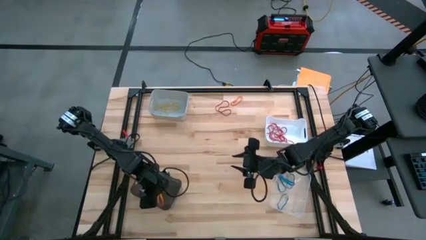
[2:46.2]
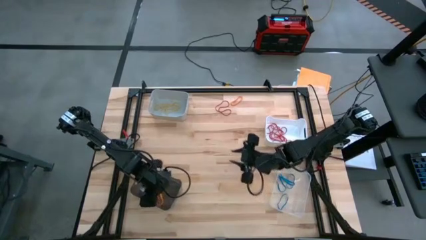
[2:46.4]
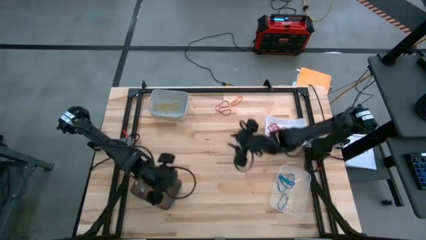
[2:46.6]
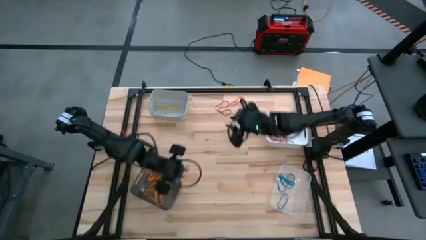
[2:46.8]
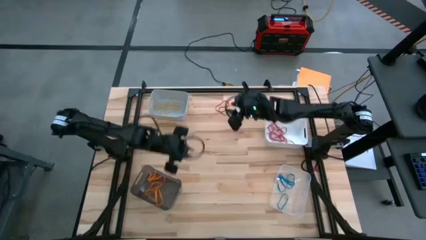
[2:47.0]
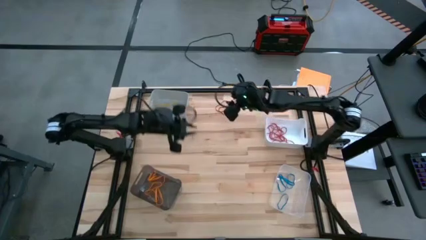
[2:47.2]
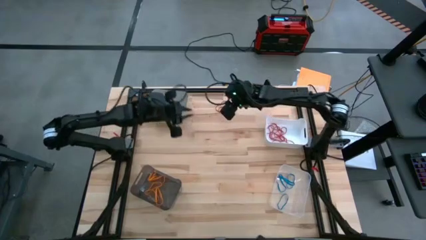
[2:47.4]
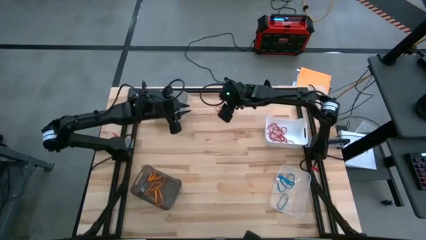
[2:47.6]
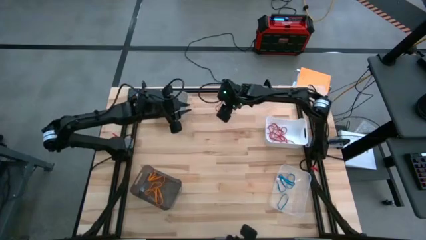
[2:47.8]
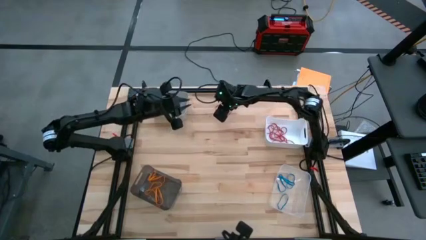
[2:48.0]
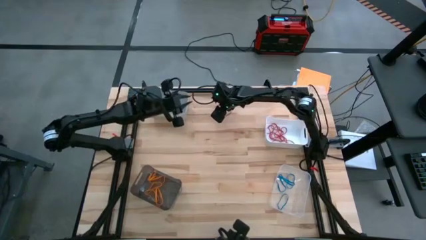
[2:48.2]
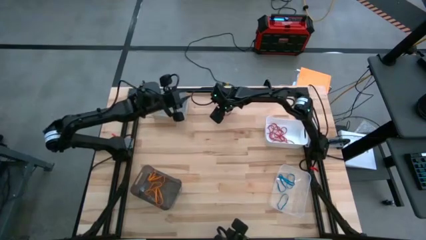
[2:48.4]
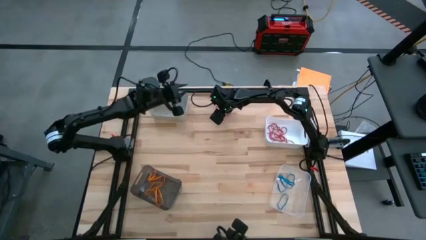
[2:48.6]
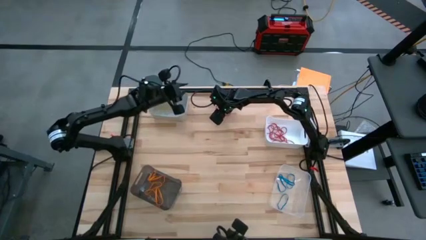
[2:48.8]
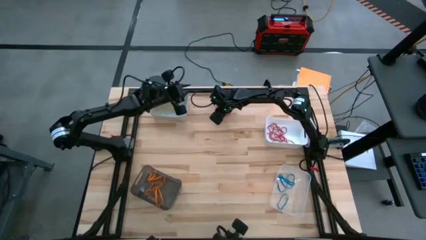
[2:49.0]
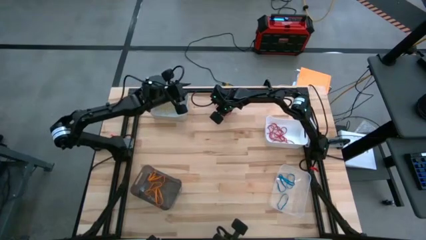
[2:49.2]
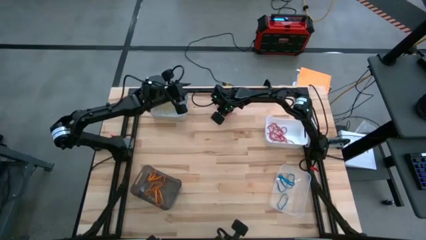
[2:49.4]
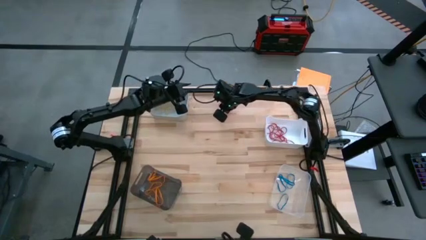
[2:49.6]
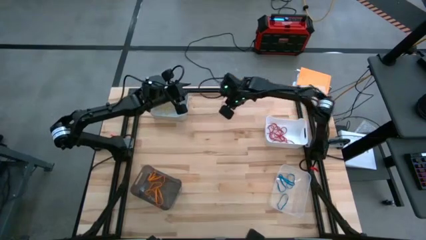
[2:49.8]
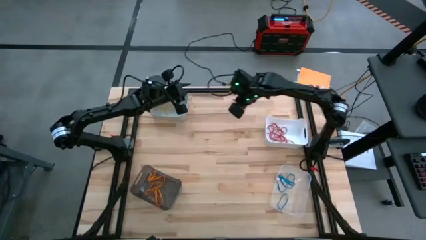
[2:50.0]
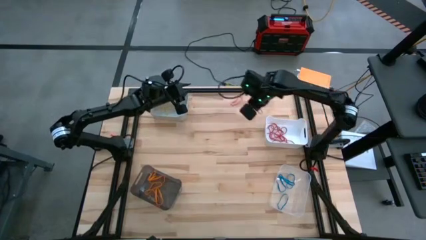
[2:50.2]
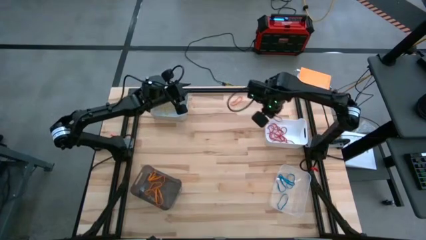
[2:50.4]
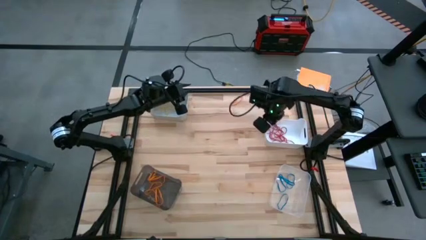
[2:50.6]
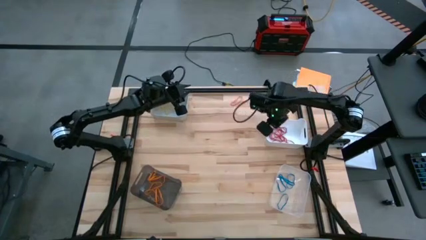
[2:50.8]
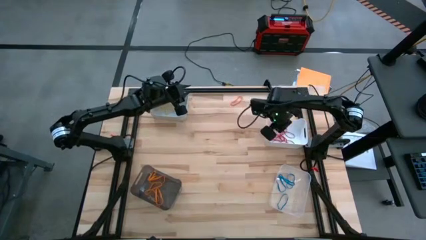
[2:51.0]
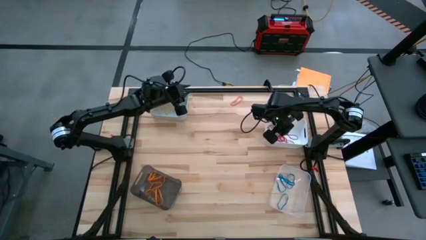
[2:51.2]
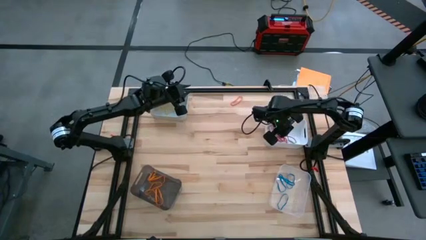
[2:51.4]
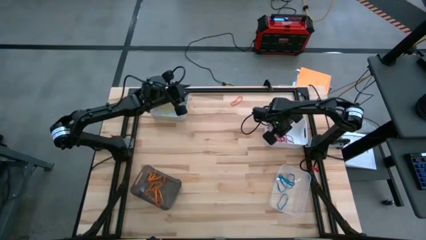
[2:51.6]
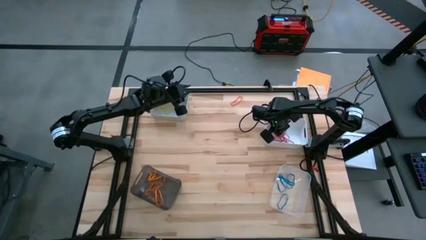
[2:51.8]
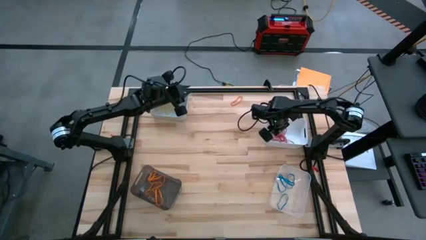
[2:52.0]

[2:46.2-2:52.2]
Task: Sort rubber bands into baskets
Put the red rubber band into the white bin

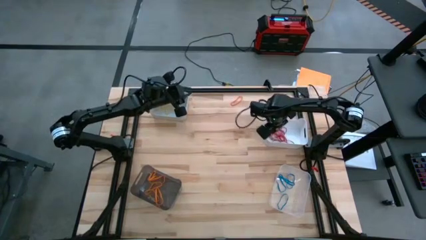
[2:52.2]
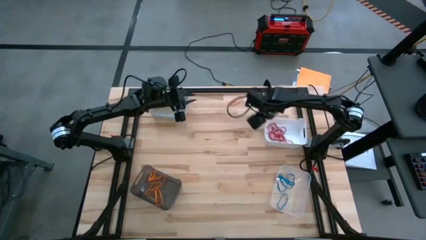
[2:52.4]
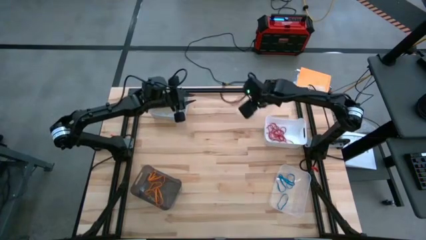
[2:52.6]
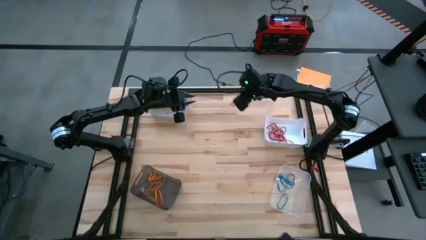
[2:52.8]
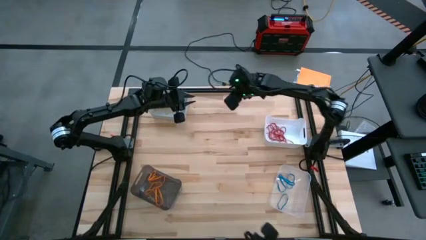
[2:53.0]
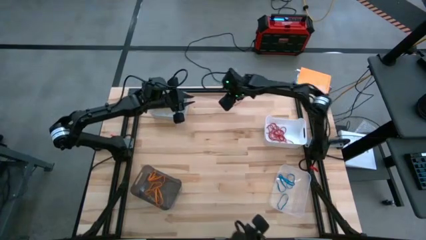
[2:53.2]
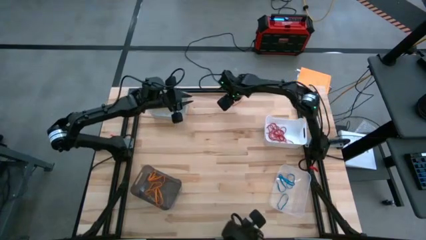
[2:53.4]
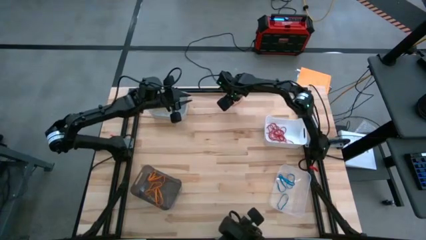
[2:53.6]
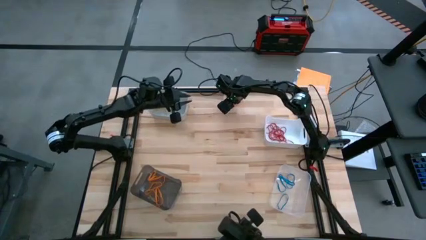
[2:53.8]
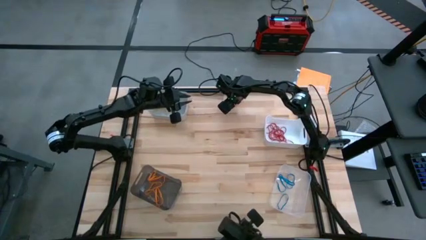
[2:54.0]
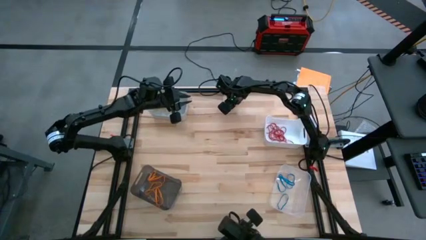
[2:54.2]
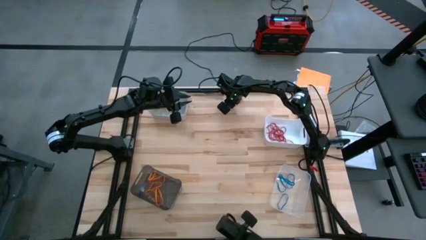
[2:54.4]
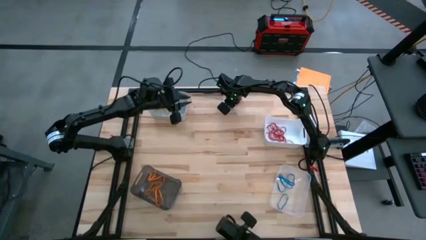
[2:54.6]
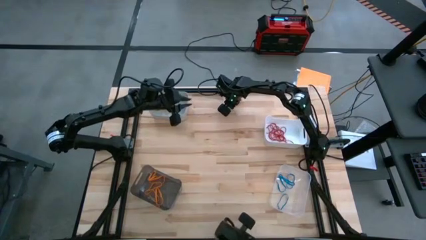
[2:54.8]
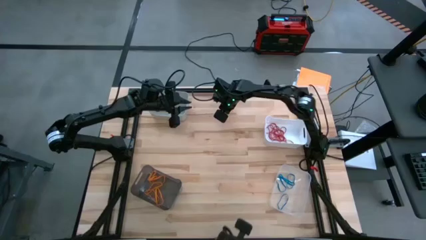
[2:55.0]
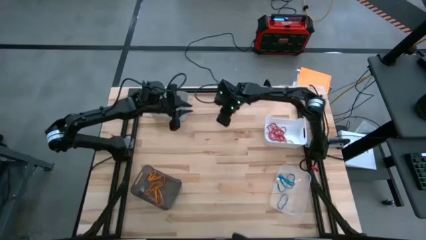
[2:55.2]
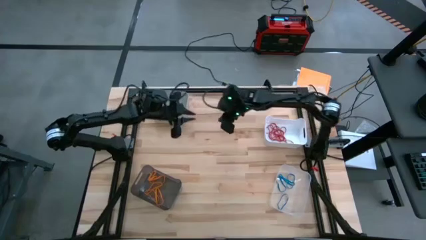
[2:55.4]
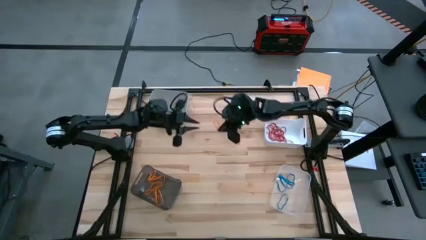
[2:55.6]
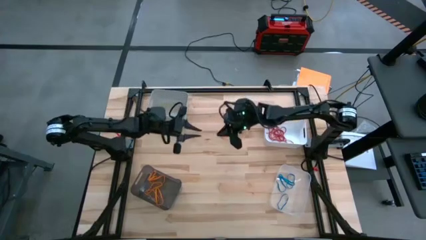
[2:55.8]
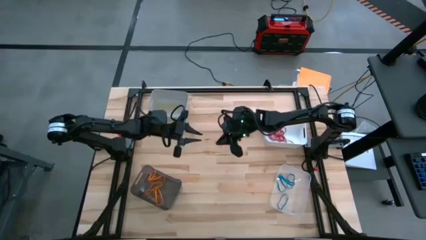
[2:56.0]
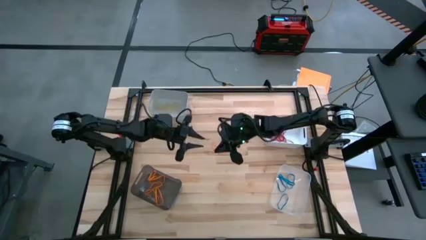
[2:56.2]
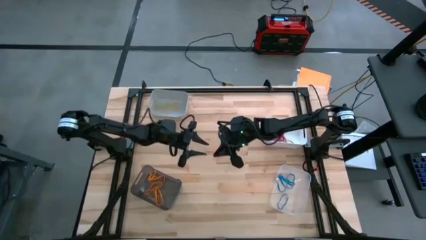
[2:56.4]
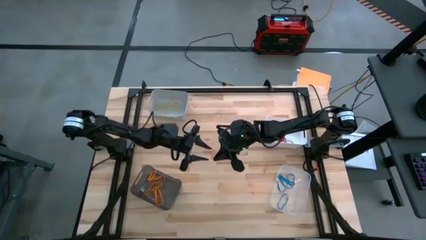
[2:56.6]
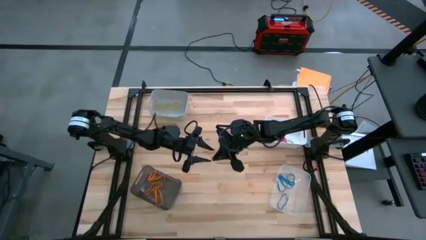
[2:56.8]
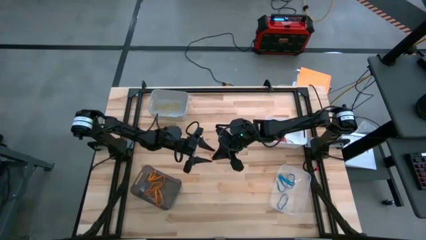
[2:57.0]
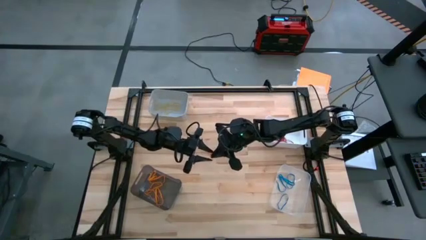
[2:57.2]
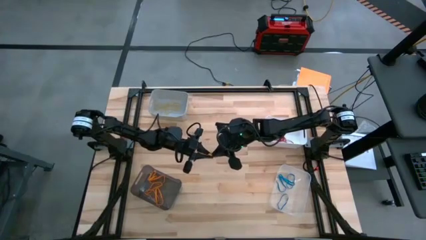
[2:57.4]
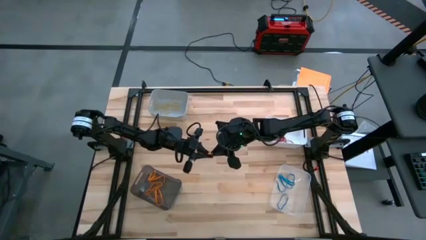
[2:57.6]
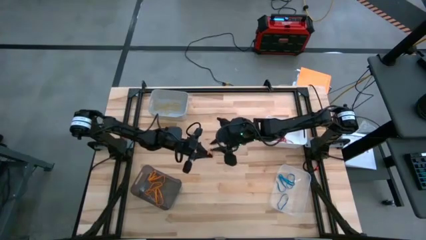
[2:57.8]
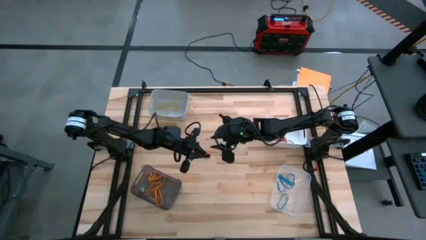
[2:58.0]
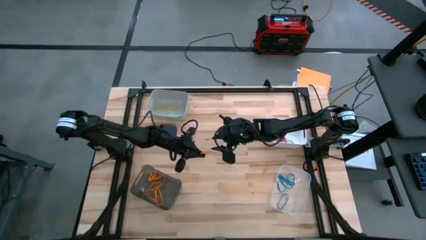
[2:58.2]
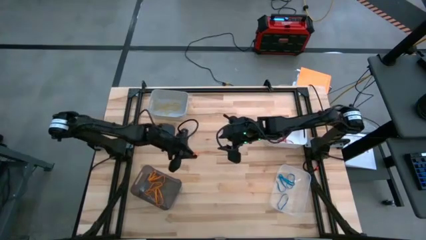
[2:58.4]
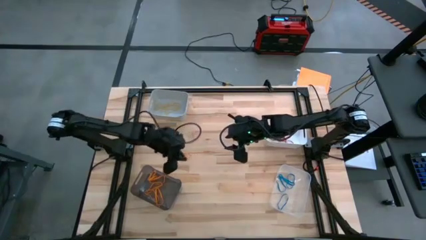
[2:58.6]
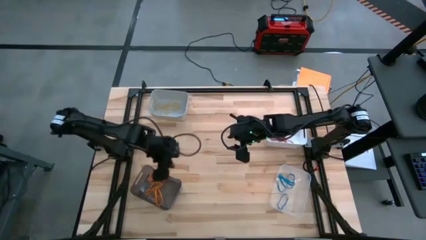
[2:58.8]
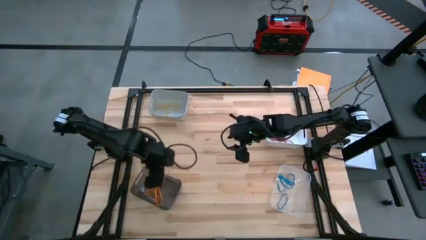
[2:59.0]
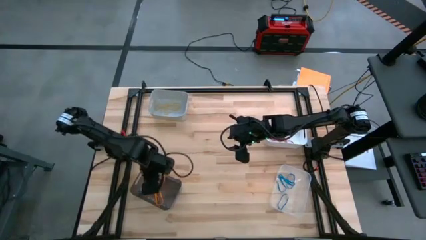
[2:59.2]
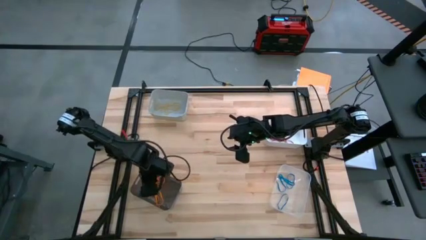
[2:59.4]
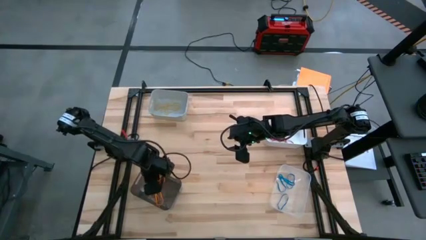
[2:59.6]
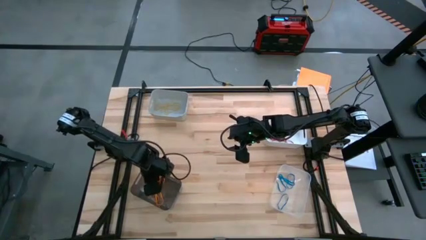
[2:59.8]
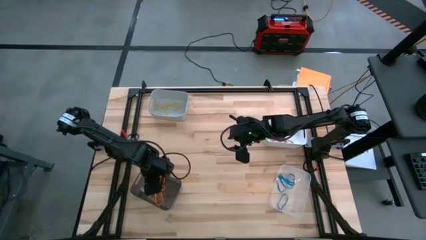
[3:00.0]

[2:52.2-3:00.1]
Put the orange rubber band into the black bin

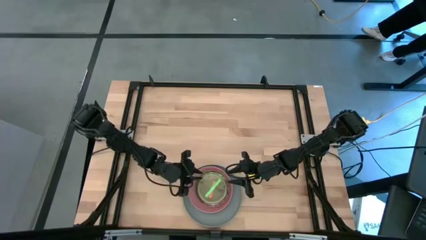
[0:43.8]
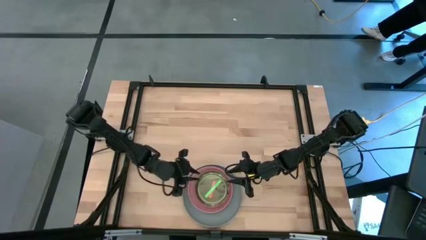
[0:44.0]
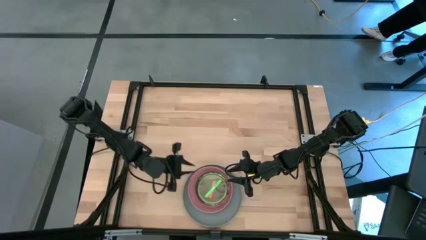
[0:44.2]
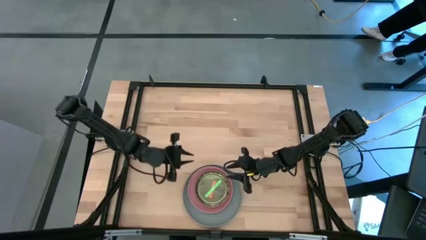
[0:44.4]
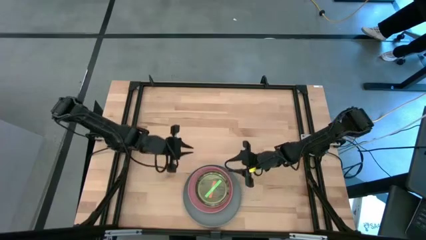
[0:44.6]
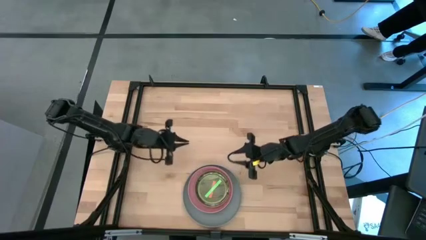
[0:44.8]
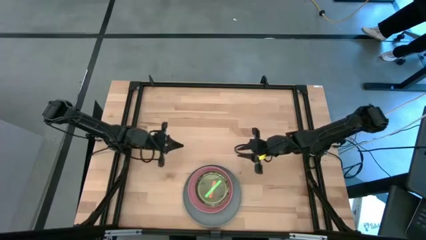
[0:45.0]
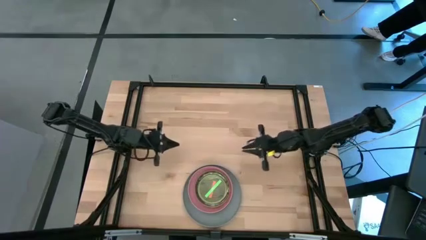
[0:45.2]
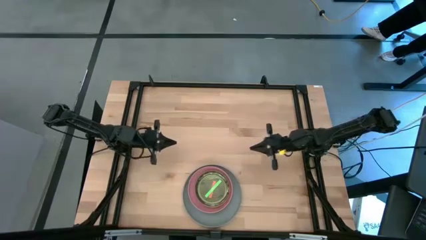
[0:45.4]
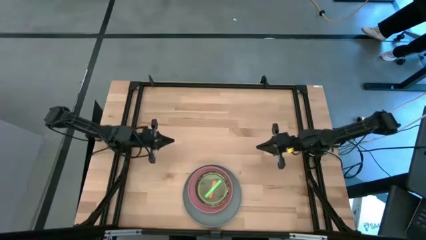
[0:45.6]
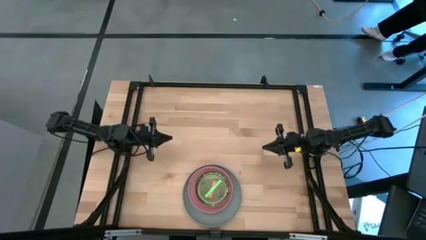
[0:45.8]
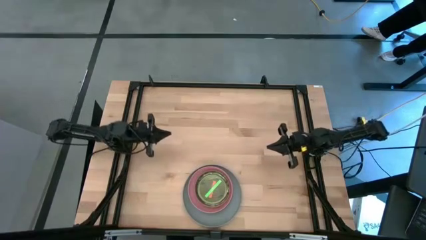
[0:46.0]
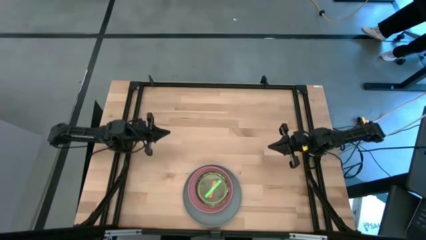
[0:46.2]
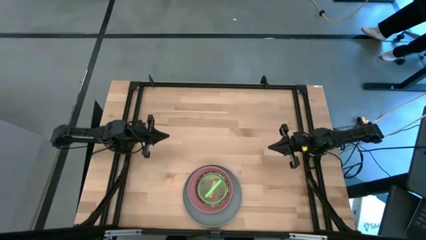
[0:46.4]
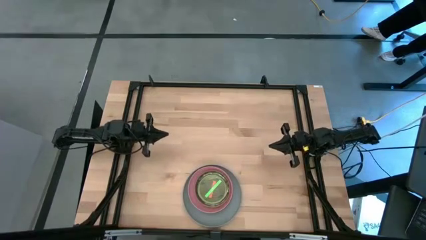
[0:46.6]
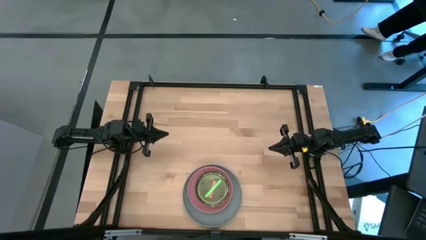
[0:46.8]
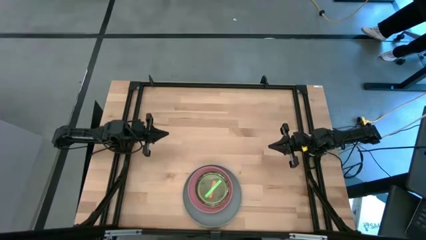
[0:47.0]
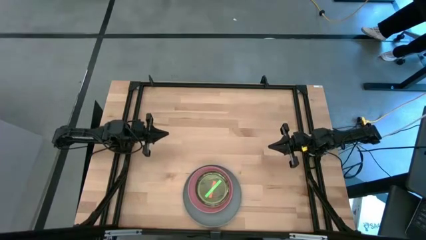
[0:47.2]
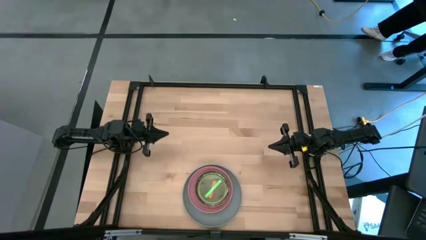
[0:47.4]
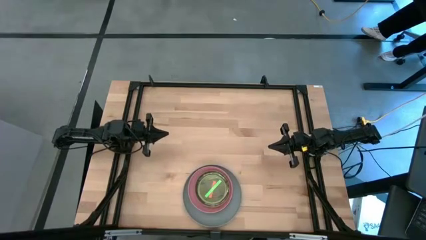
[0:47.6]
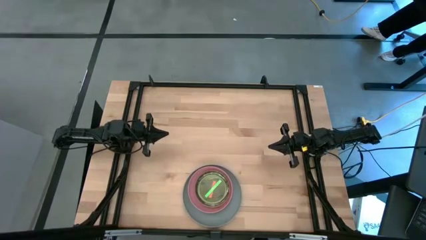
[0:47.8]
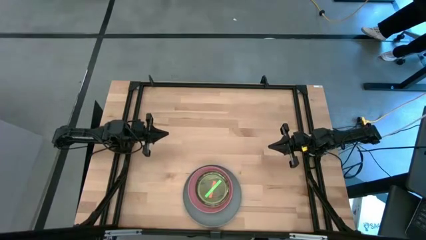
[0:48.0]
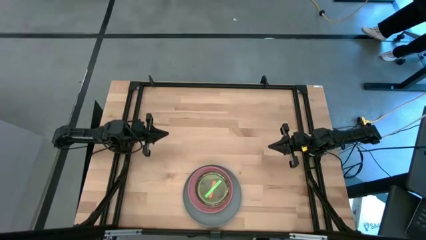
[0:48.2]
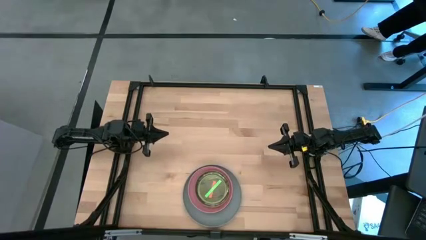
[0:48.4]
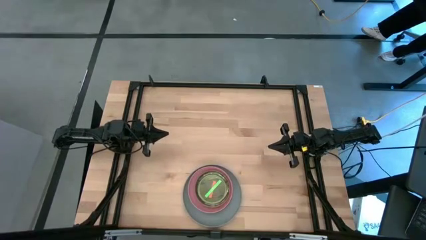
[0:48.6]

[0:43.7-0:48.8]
Task: Stack plastic plates
Return to Home Position
